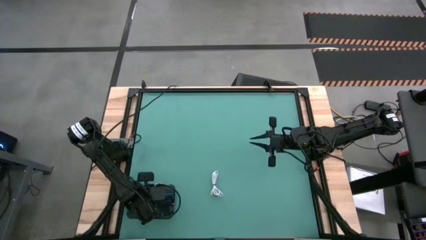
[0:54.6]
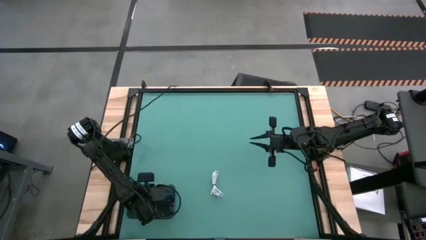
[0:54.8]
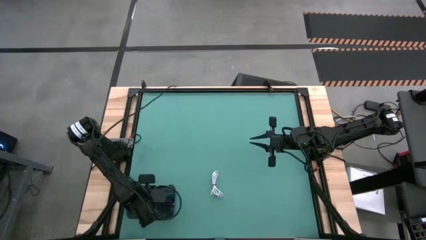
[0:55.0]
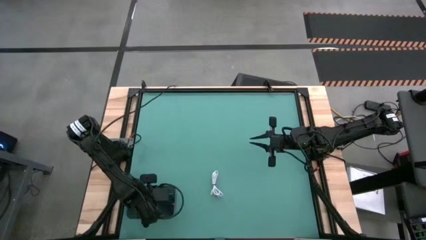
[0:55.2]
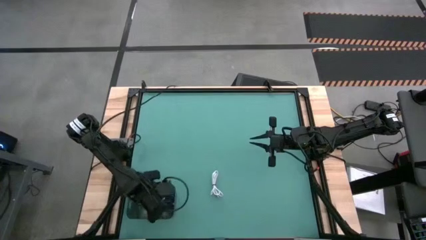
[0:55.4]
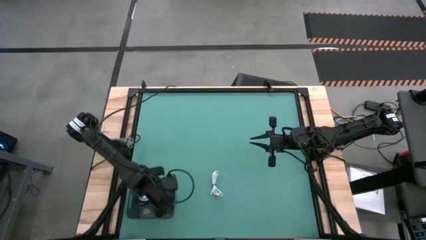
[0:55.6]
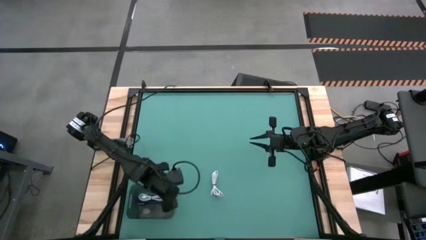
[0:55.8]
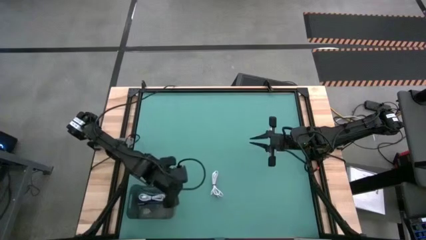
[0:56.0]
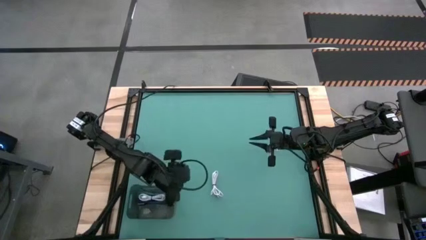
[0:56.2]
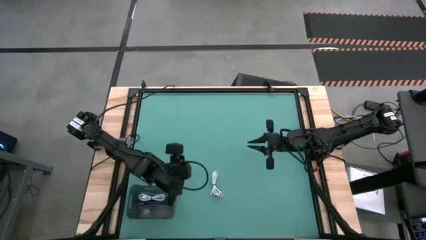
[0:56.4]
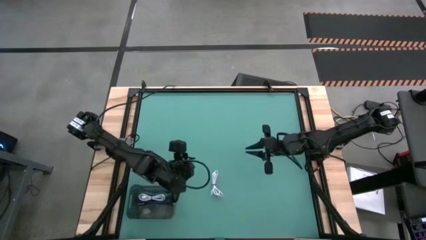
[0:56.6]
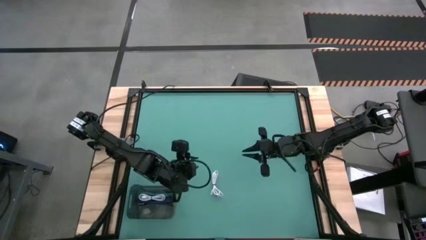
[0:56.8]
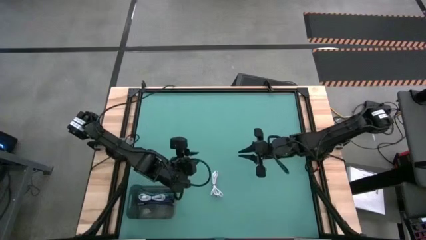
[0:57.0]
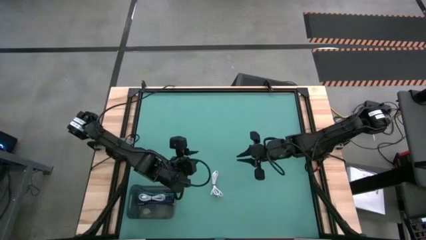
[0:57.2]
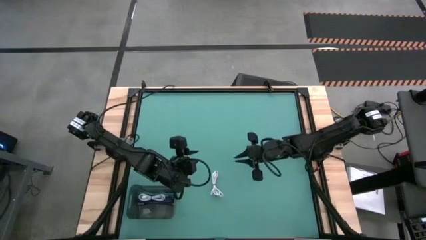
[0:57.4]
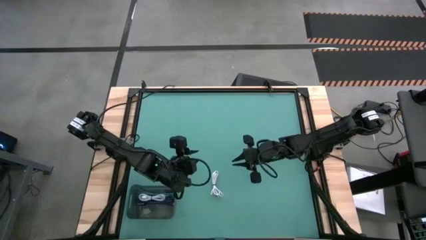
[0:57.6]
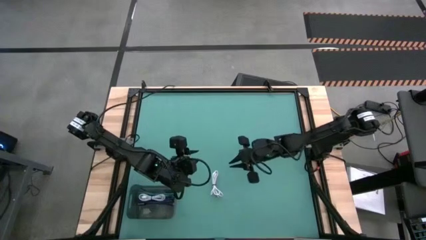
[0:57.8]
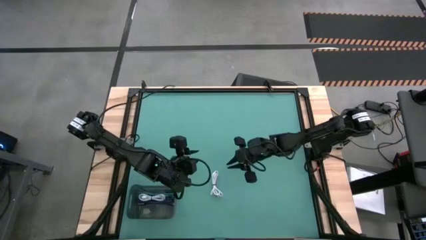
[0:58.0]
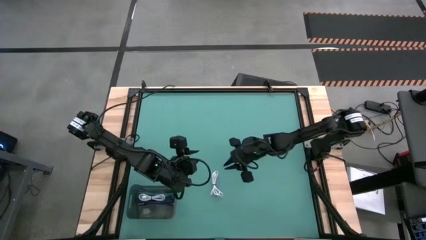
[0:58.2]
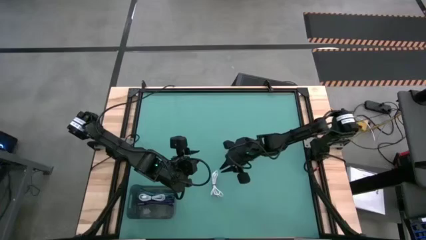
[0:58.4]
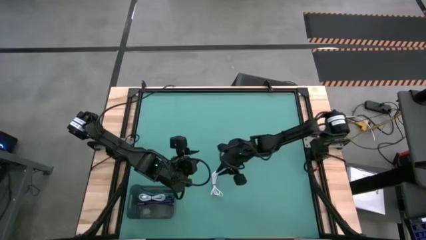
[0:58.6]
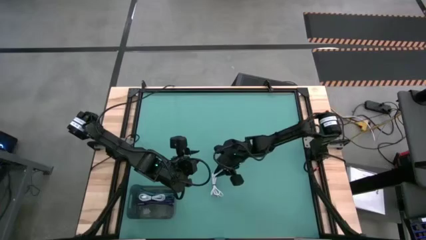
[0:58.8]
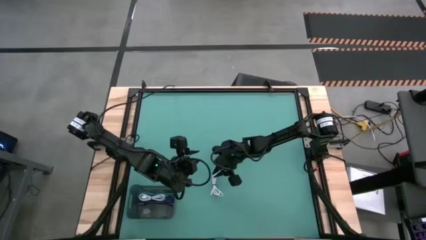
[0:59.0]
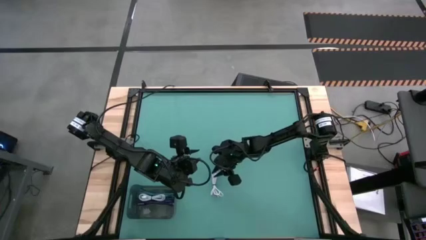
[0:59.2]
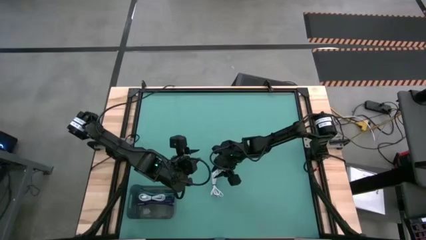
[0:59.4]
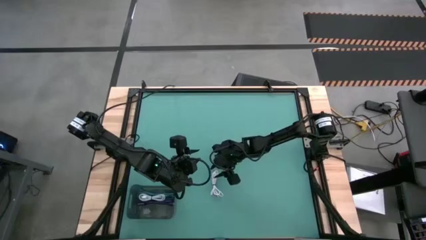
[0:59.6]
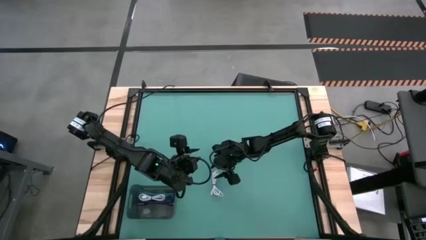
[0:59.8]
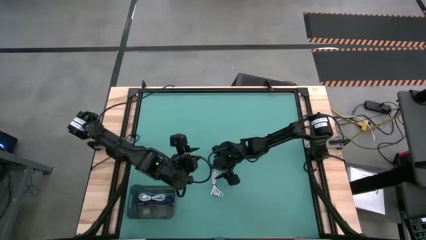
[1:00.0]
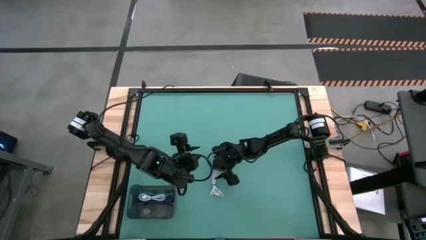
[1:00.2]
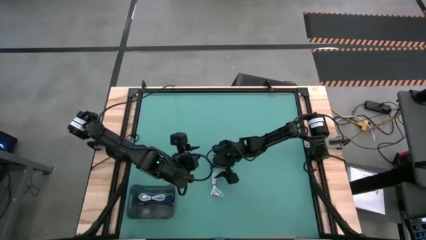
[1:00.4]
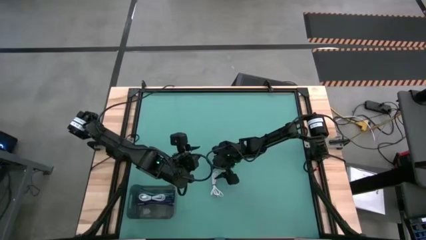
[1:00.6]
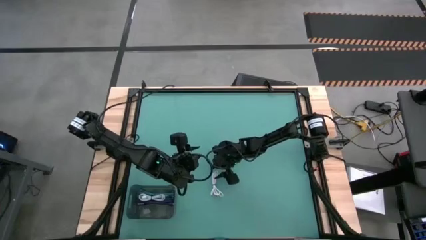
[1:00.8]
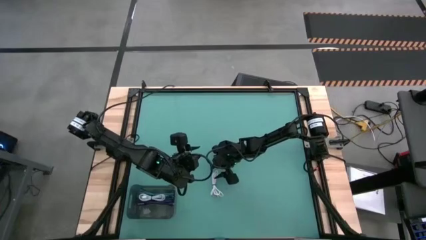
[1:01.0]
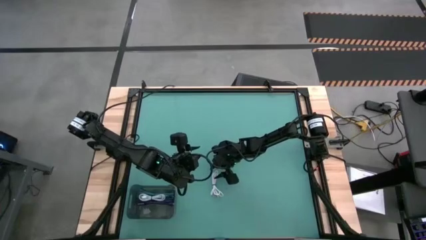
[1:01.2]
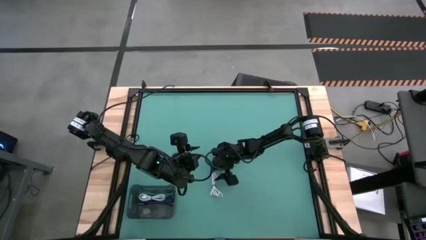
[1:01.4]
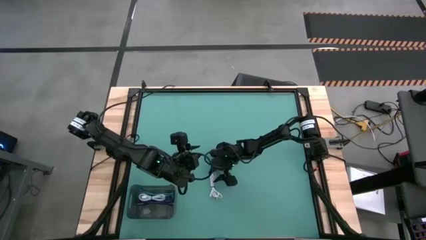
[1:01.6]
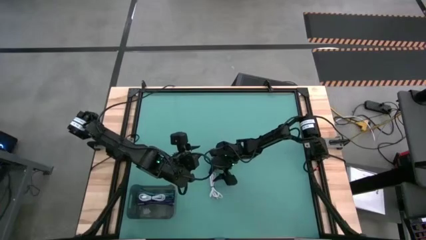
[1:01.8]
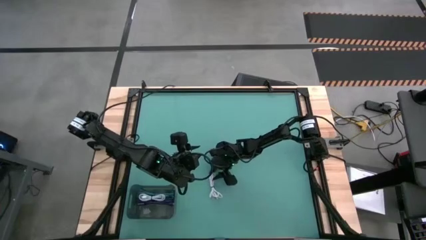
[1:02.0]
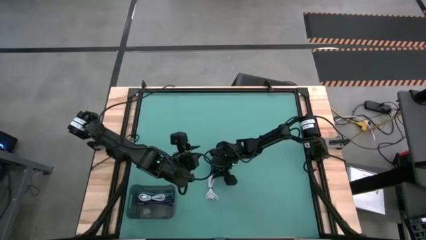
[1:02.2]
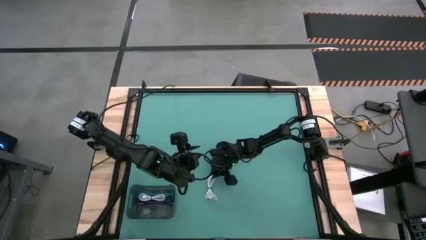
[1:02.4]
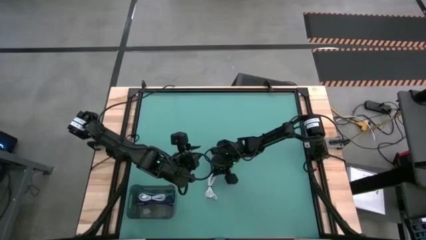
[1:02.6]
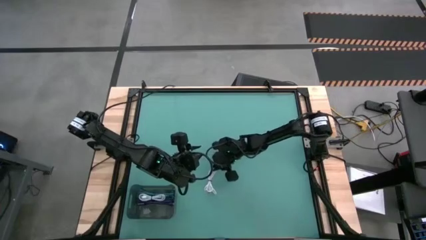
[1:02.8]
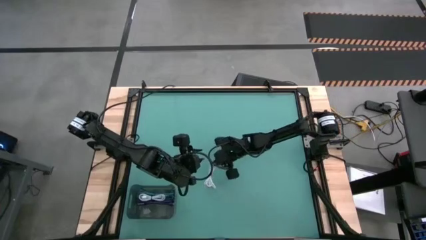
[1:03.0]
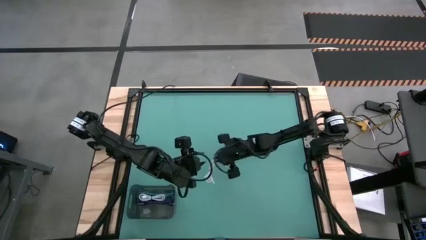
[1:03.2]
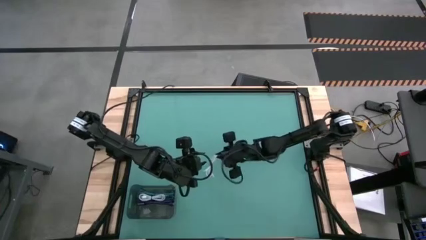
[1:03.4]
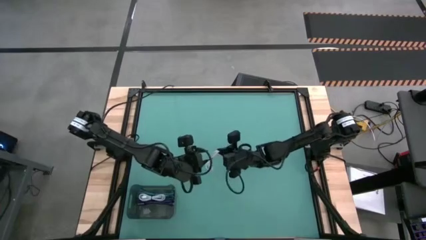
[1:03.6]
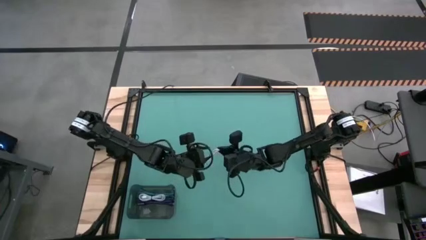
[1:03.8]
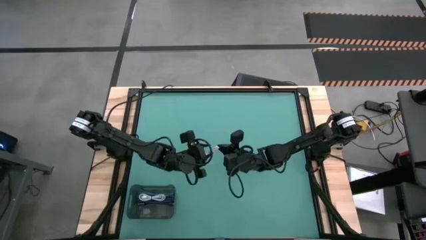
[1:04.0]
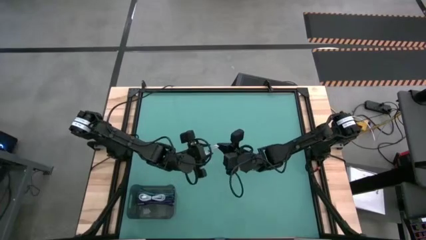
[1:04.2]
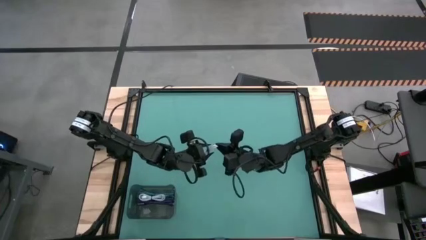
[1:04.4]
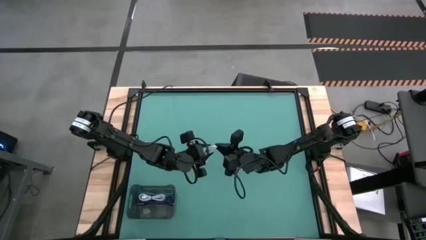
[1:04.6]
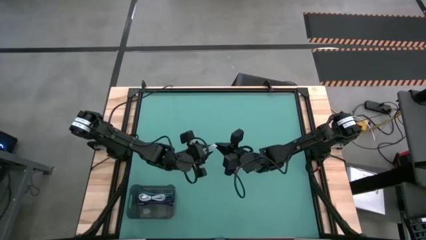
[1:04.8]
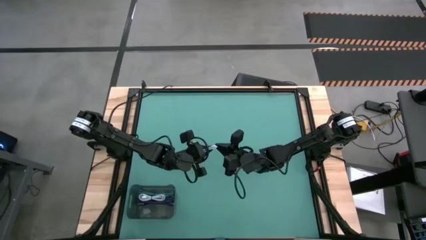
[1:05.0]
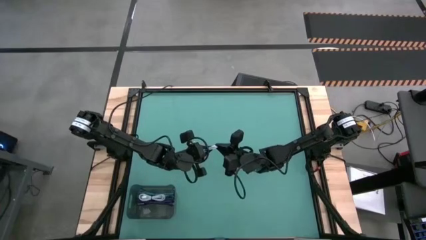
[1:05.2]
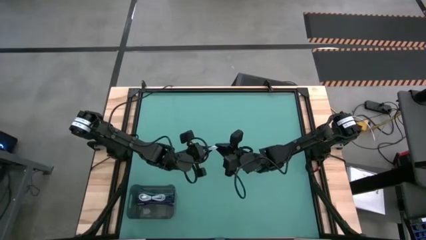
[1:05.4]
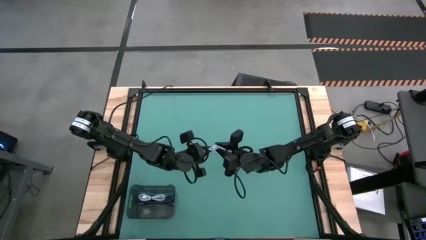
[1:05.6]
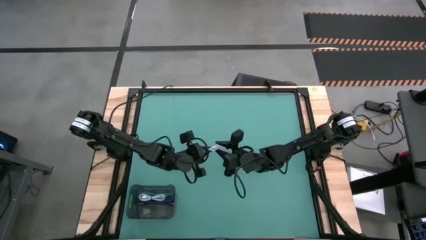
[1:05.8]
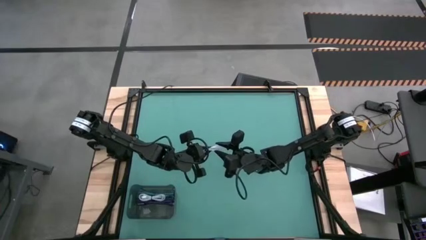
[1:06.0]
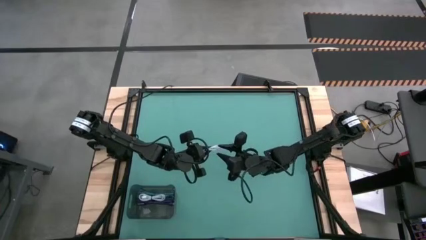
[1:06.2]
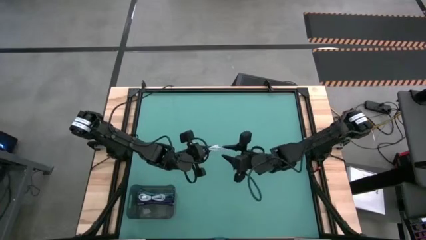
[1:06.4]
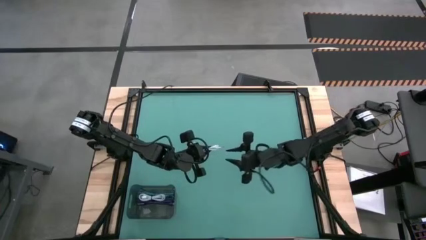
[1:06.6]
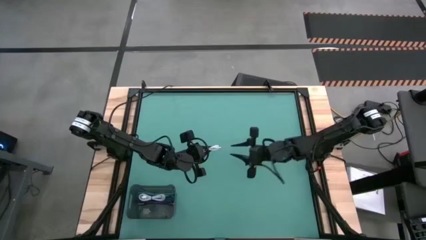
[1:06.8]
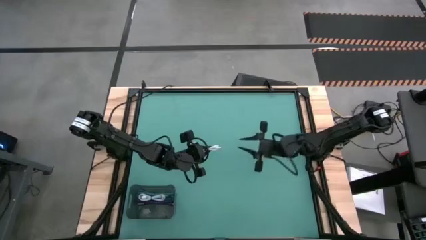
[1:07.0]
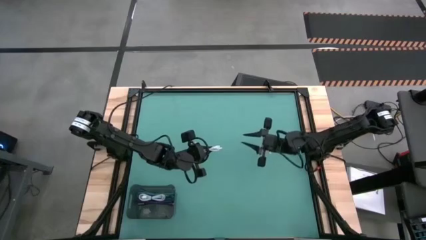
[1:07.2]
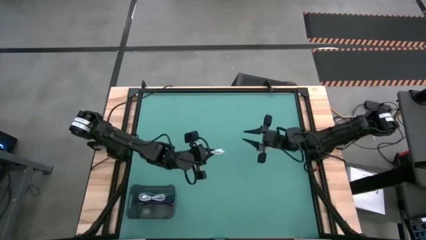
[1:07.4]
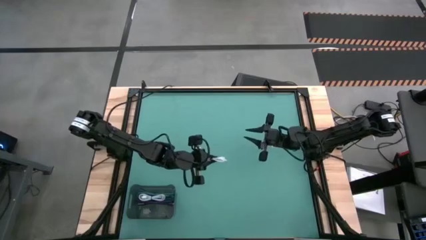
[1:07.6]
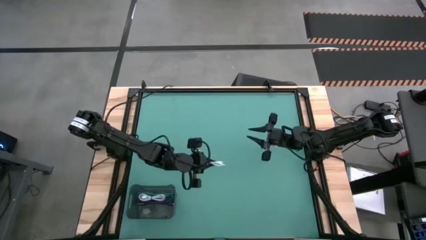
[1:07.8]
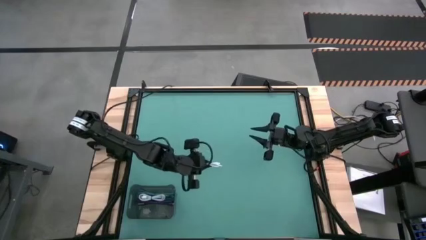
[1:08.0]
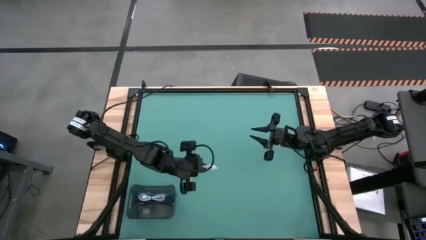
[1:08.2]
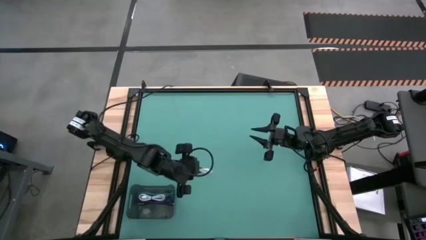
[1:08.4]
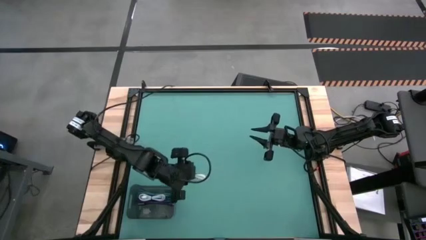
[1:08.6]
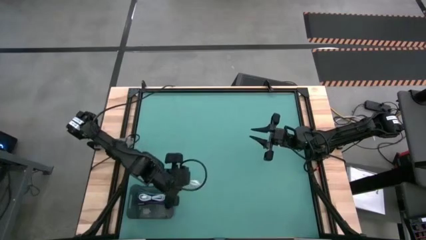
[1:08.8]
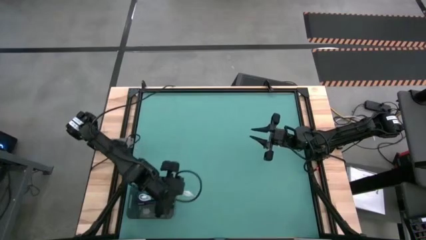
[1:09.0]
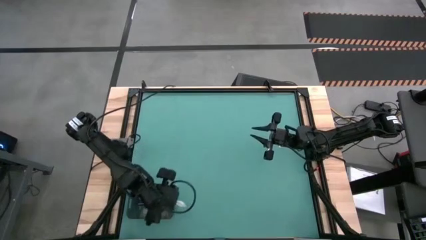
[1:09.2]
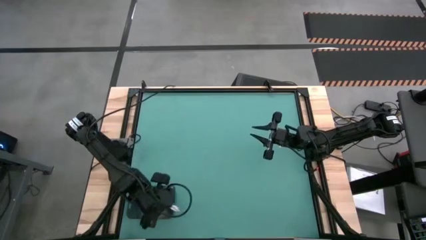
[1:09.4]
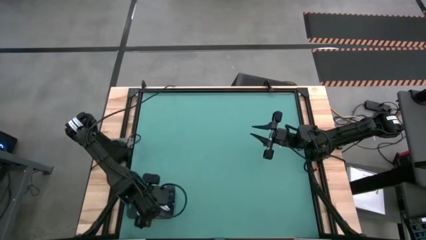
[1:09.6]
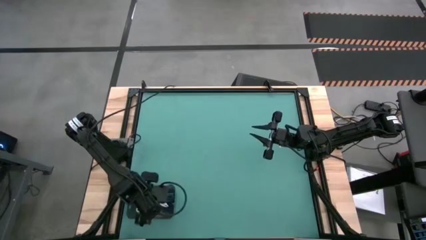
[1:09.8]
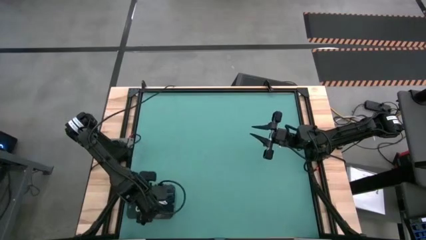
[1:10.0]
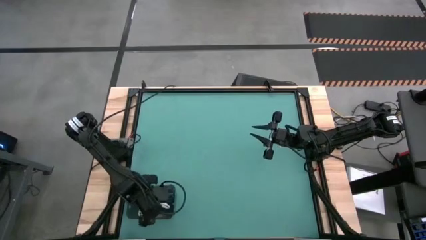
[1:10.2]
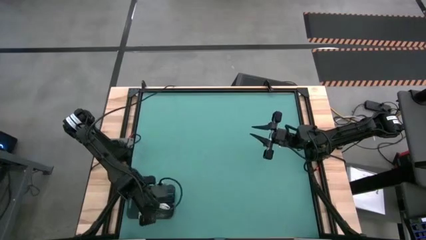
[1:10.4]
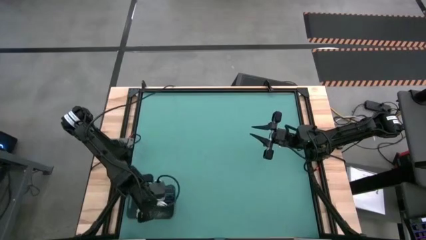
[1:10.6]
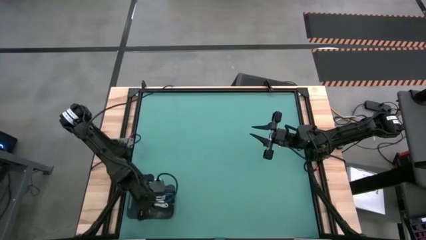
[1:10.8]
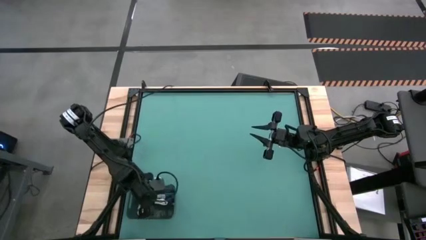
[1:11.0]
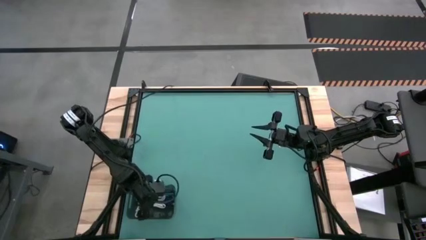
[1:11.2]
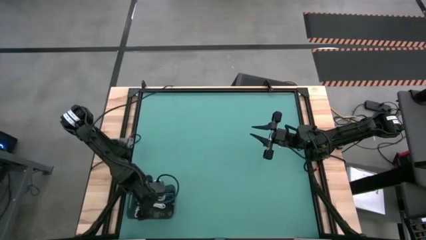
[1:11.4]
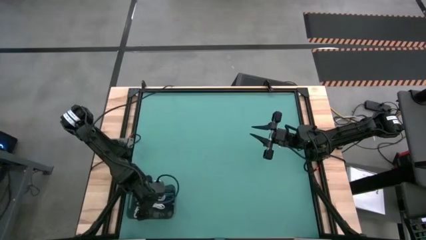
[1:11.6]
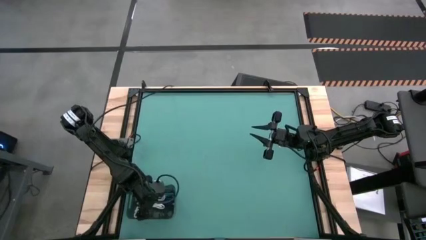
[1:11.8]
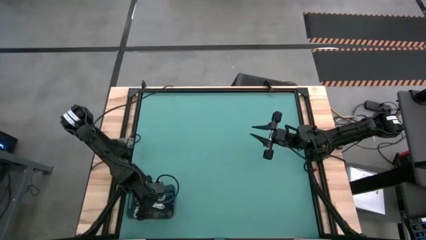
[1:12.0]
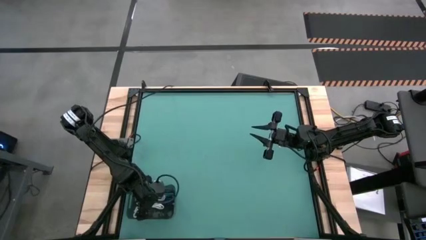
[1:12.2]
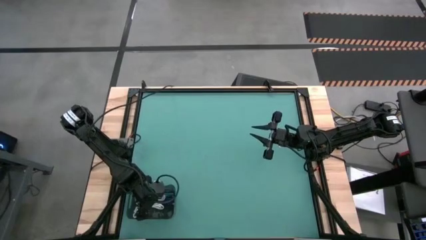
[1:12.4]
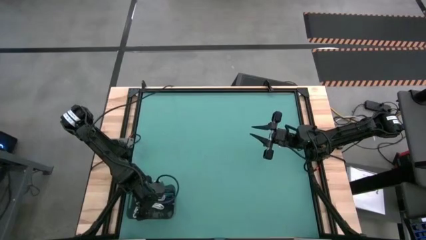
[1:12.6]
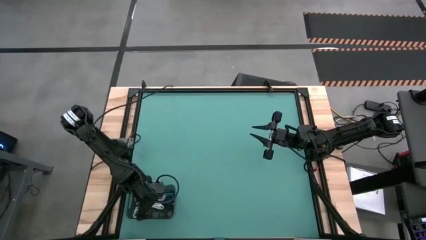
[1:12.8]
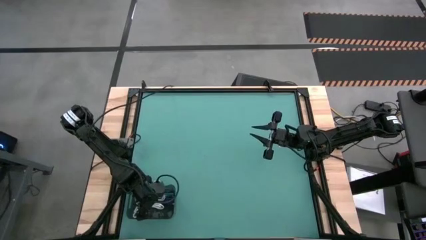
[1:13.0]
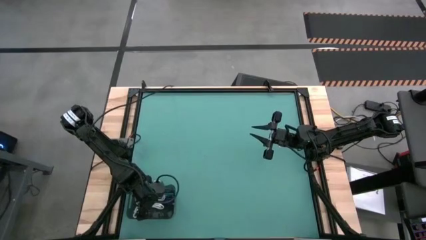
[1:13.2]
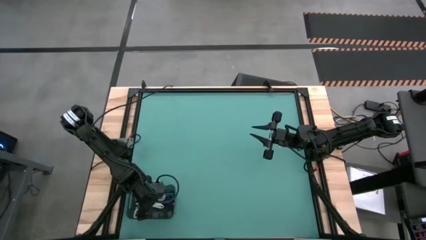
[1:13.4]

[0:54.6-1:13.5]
Task: Pick and place USB-C Cables
Put the white charger cable into the black bin
